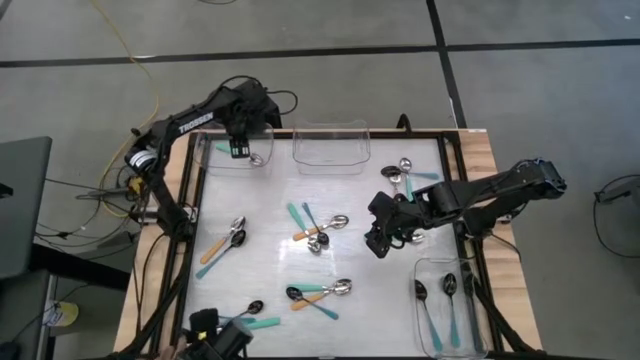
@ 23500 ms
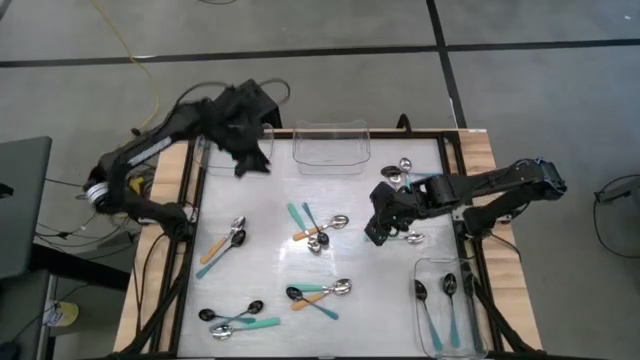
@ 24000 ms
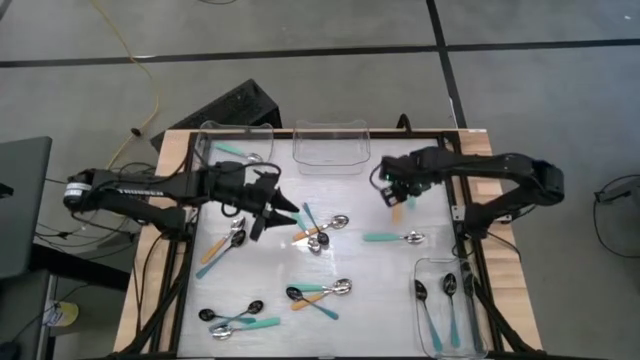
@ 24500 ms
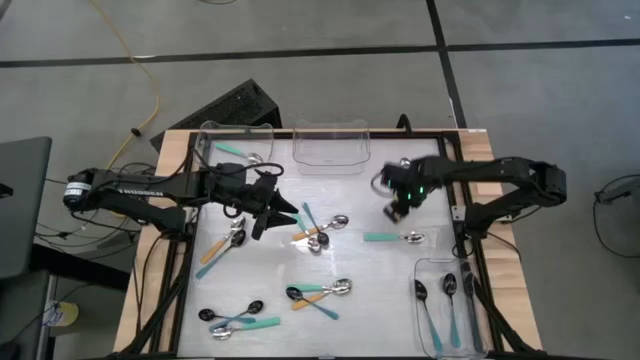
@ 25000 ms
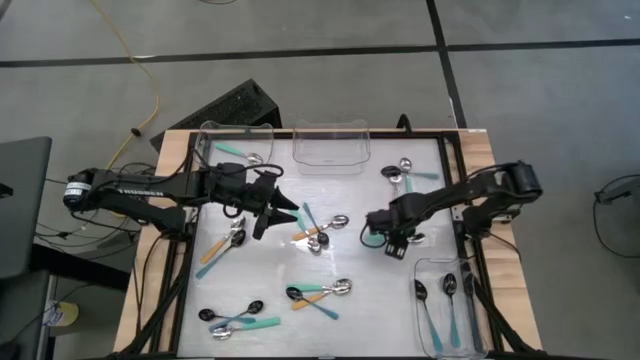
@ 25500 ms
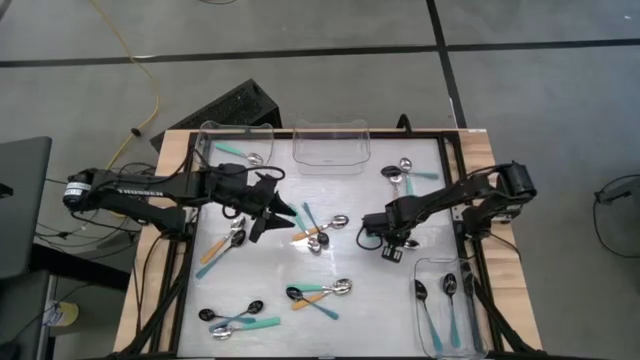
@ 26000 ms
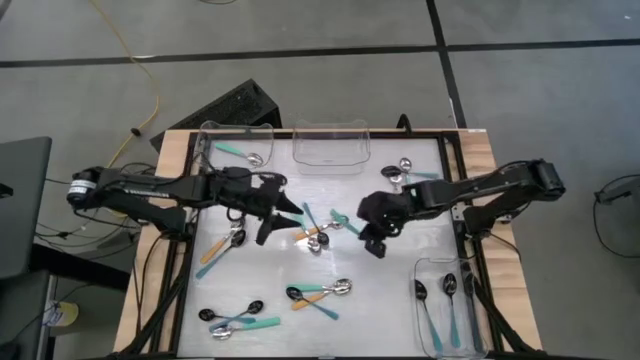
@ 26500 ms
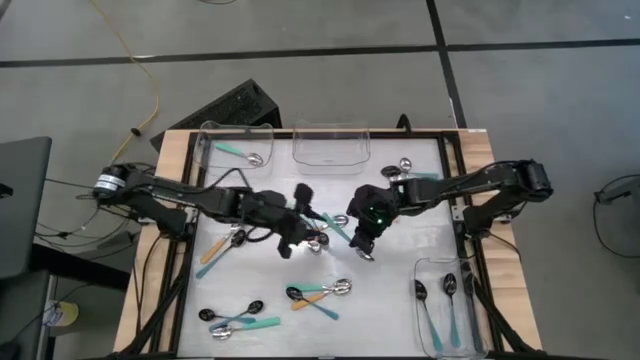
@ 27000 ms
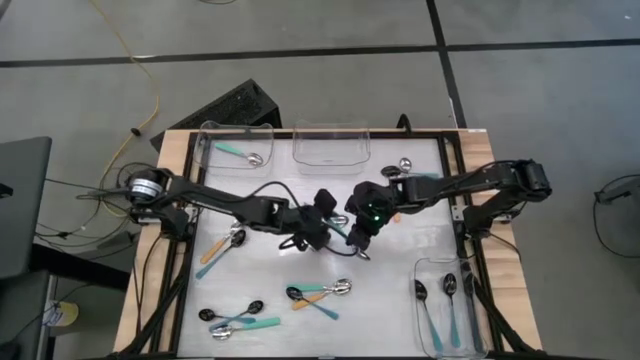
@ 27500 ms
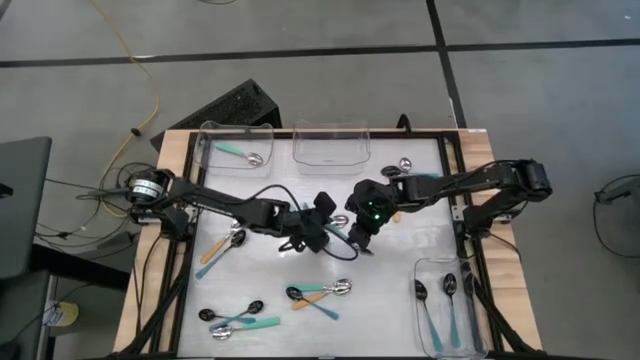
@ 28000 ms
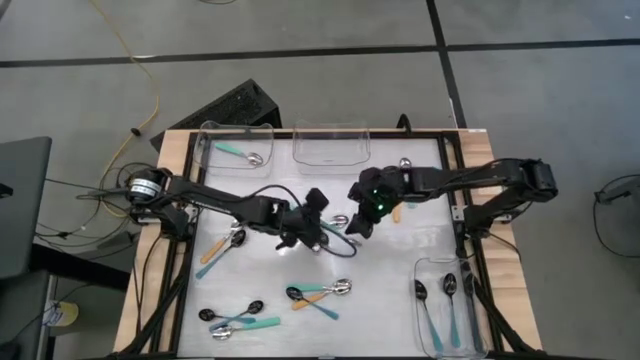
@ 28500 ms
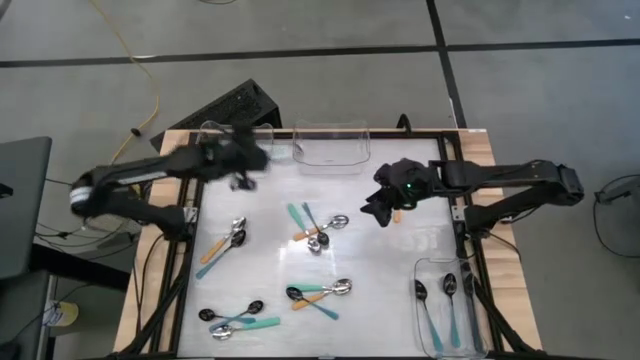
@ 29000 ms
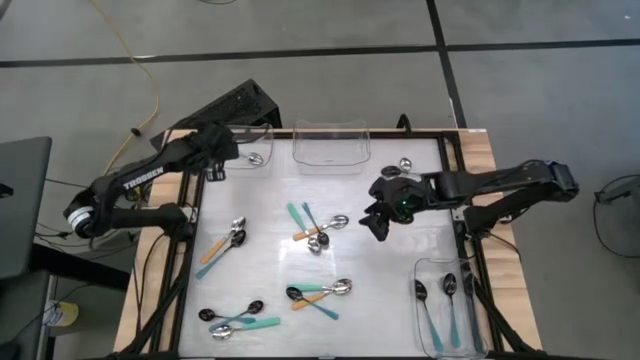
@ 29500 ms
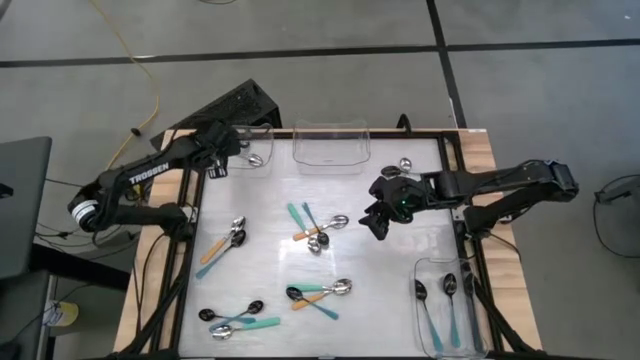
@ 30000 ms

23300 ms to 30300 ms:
Task: Sort silverware by color (type)
Put the green spoon into the top left transparent bin

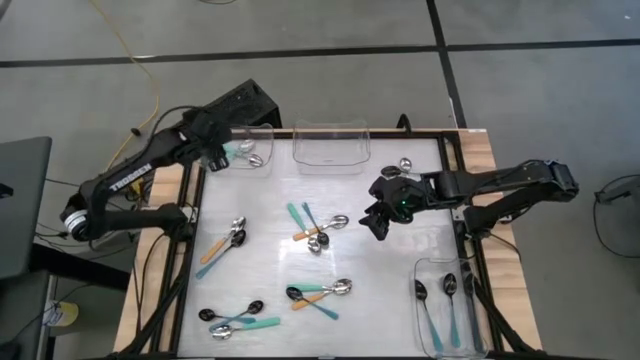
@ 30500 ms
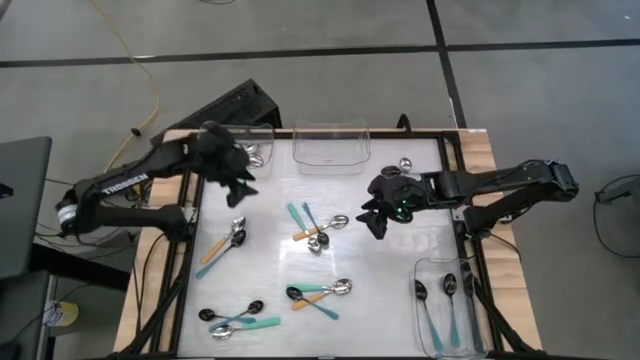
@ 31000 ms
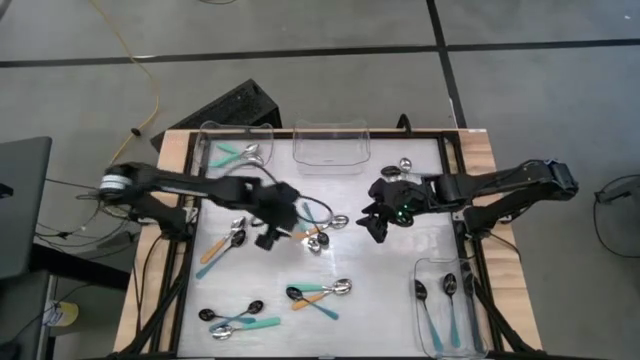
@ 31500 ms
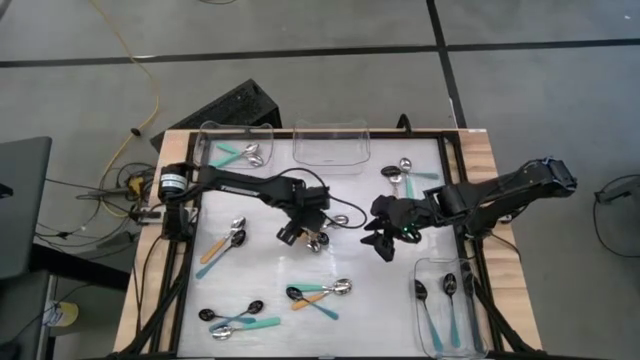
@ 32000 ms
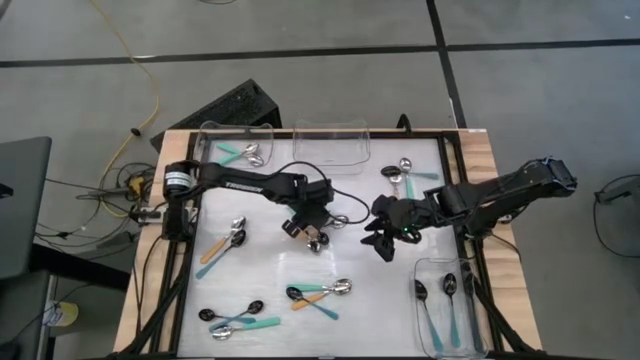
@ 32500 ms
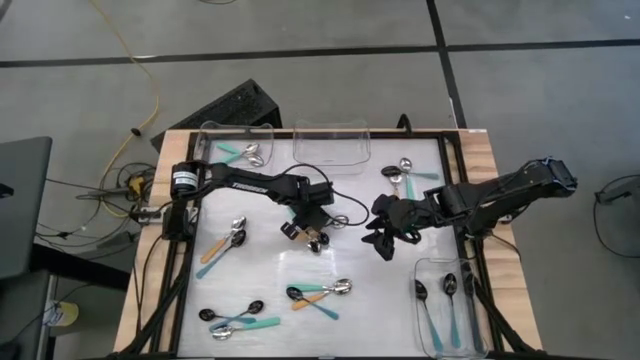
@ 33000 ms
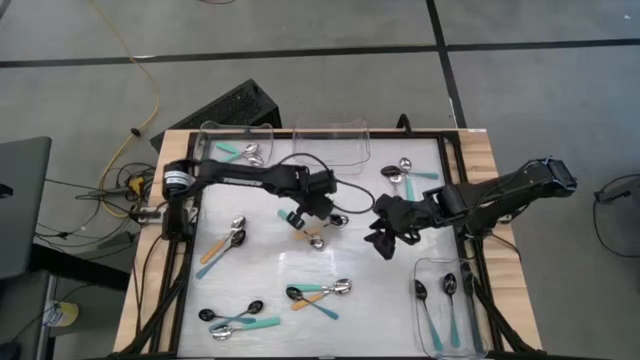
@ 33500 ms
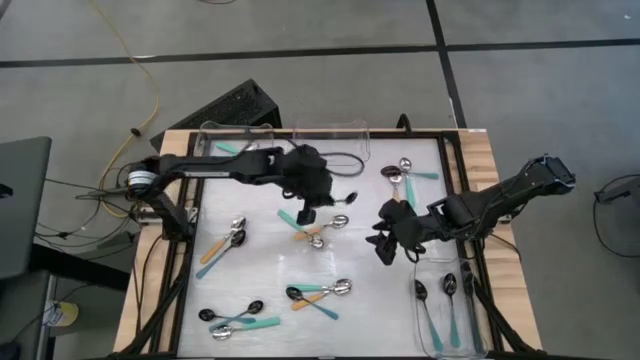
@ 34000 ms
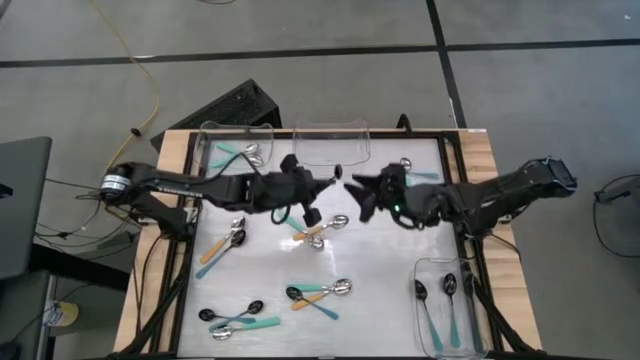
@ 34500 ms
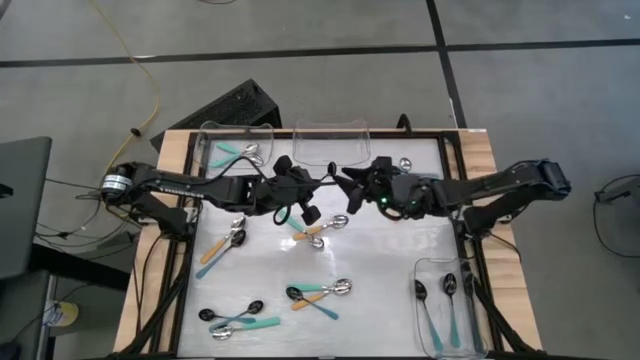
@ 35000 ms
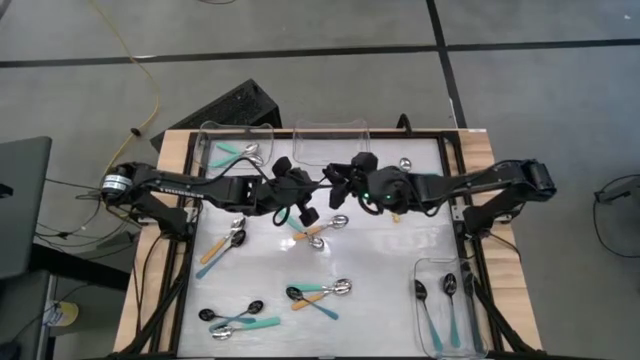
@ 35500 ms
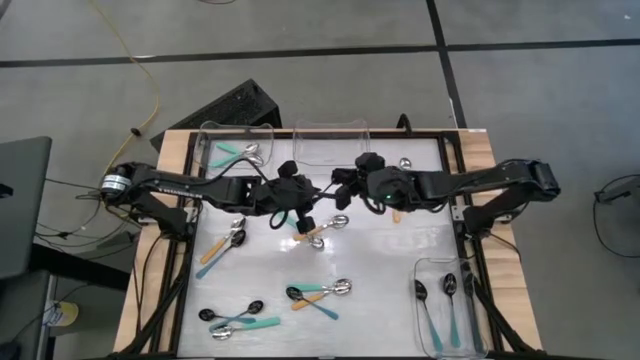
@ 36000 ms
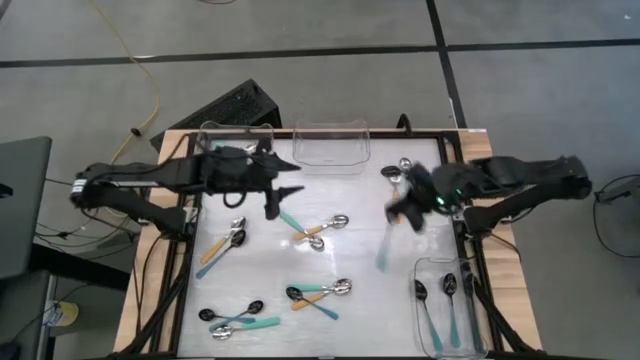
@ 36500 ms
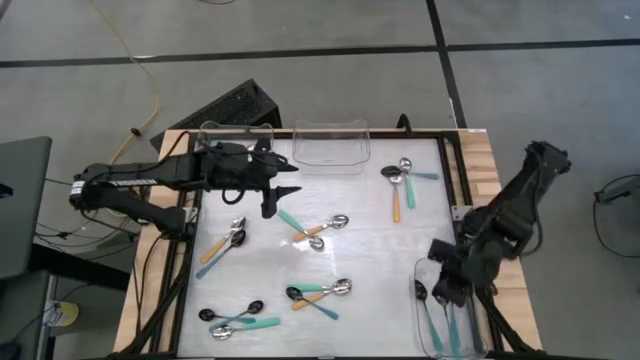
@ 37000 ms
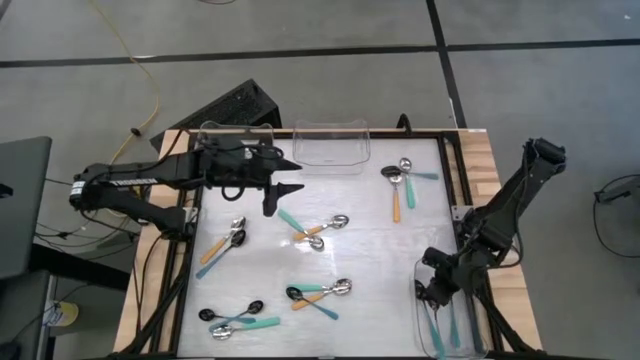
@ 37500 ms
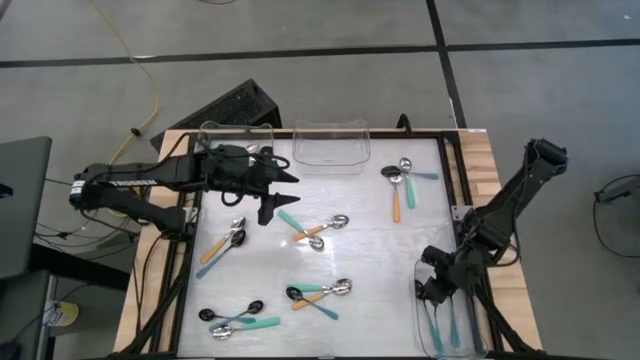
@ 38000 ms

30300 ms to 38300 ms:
Put the blue spoon into the bottom transparent bin

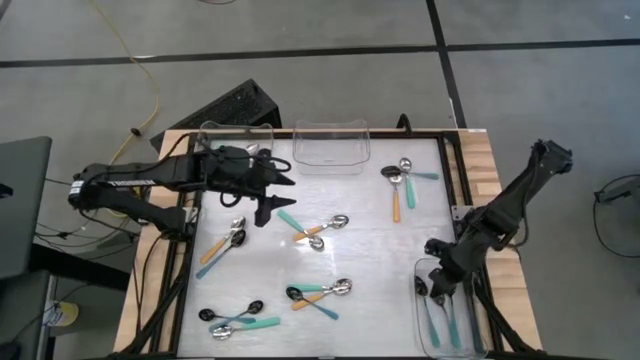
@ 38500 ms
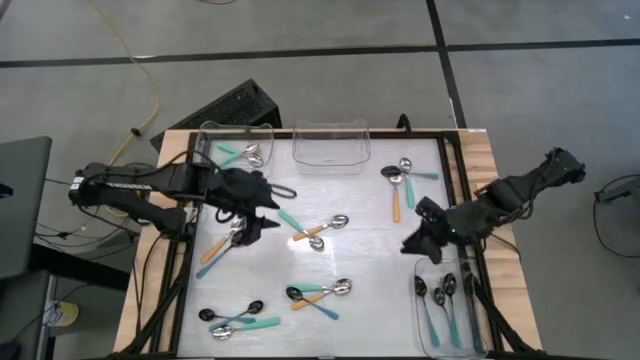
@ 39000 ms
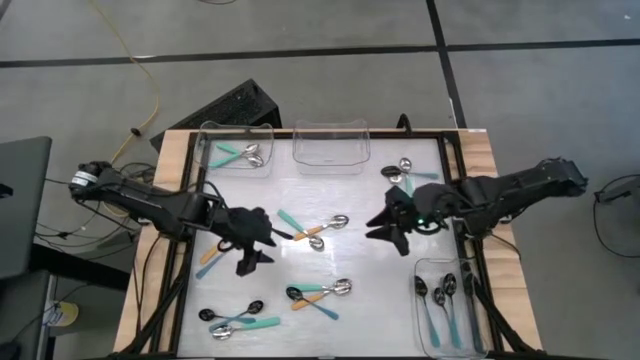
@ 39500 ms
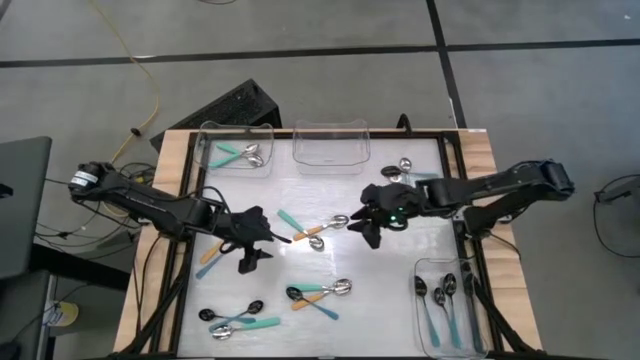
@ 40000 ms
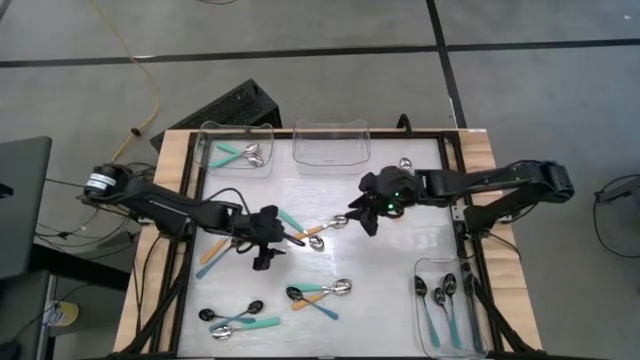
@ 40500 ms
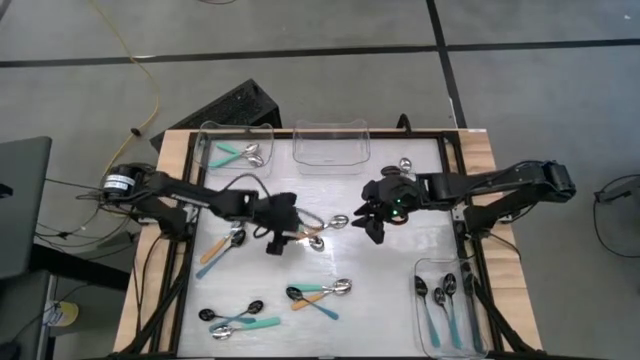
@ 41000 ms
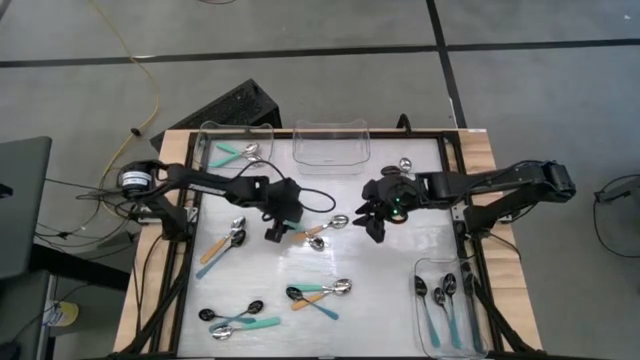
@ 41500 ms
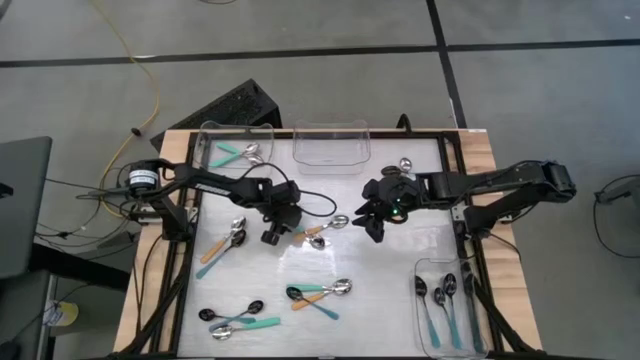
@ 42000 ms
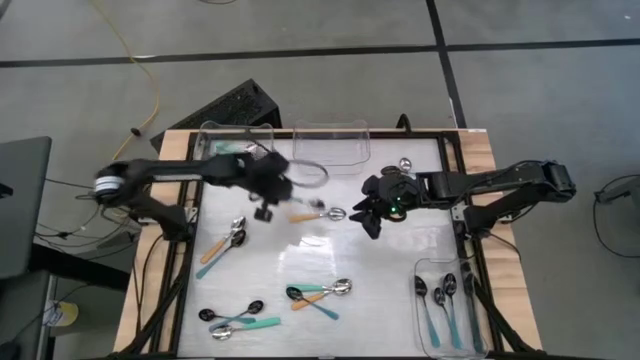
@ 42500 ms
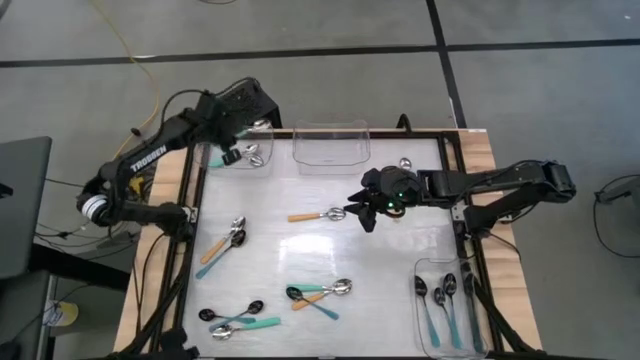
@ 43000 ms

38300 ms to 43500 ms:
Put the green spoon into the top left transparent bin

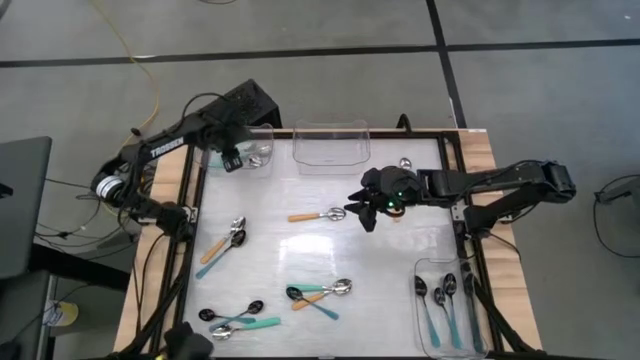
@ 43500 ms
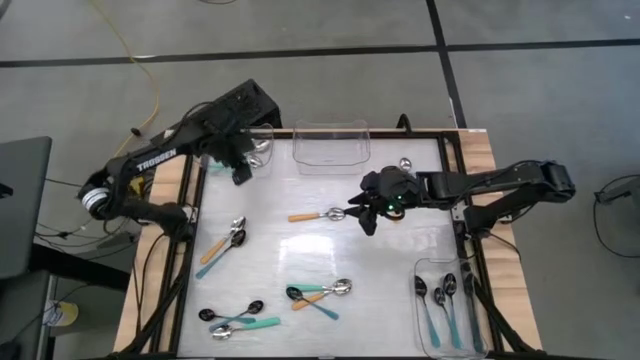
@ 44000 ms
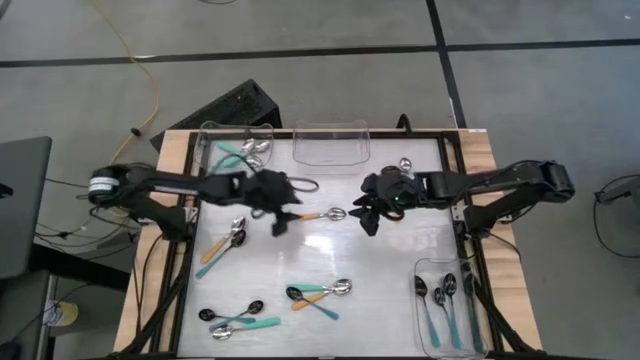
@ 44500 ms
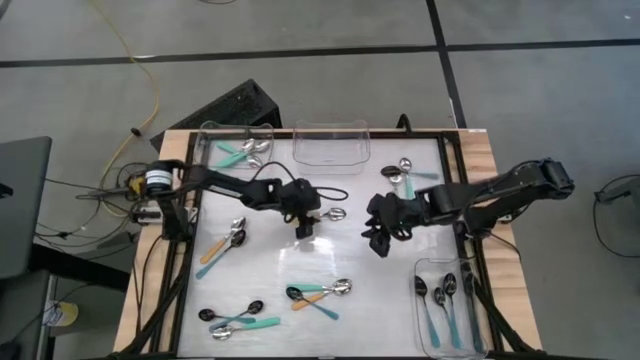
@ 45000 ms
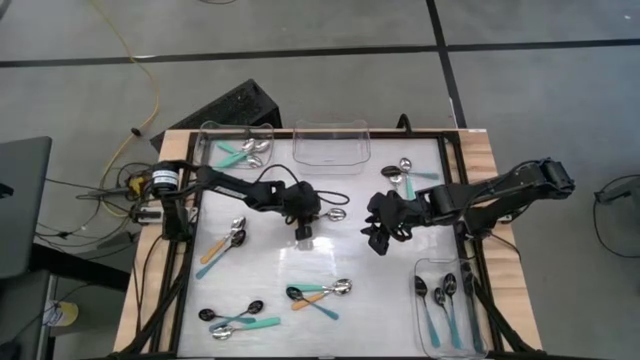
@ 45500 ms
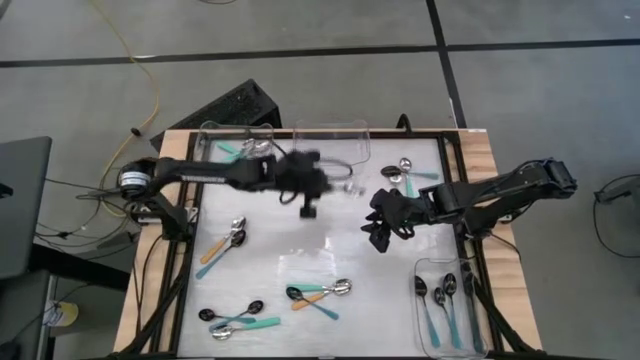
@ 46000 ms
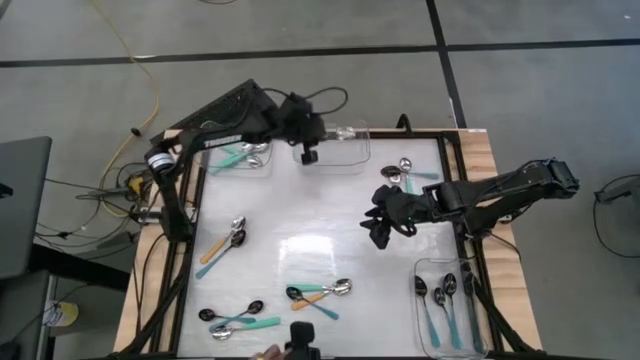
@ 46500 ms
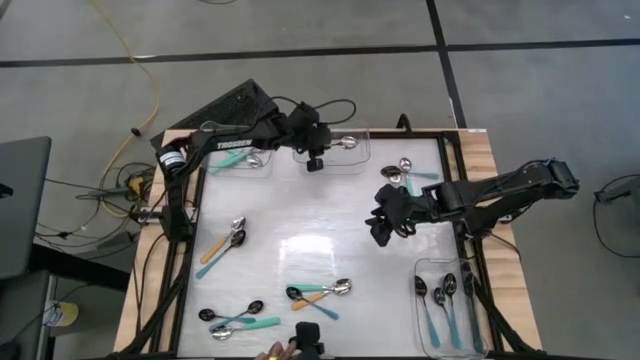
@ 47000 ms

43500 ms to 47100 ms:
Put the yellow spoon into the top right transparent bin
